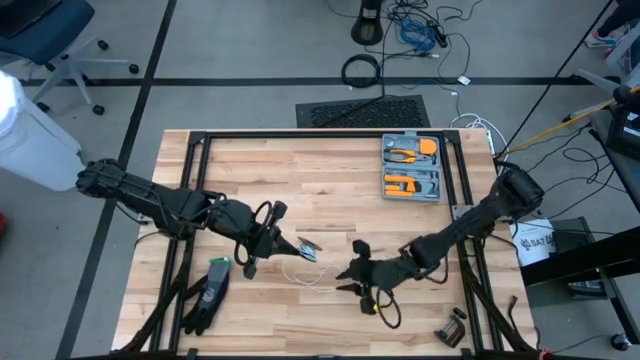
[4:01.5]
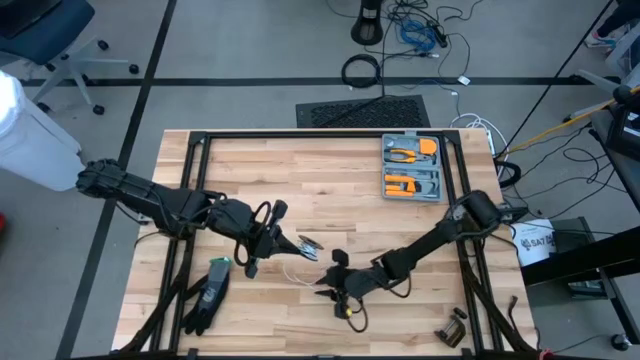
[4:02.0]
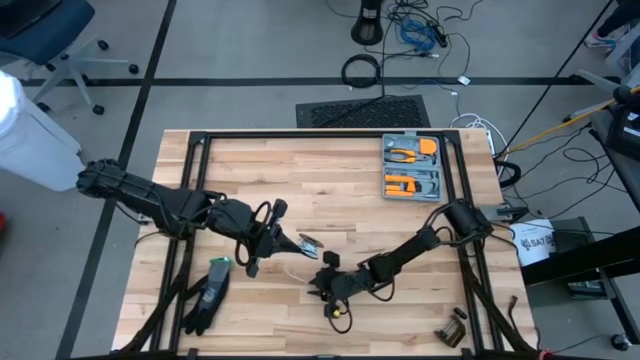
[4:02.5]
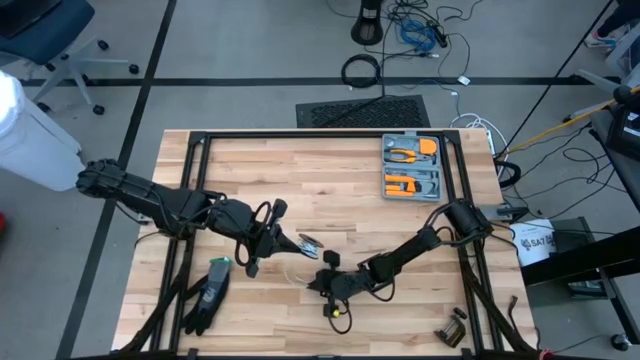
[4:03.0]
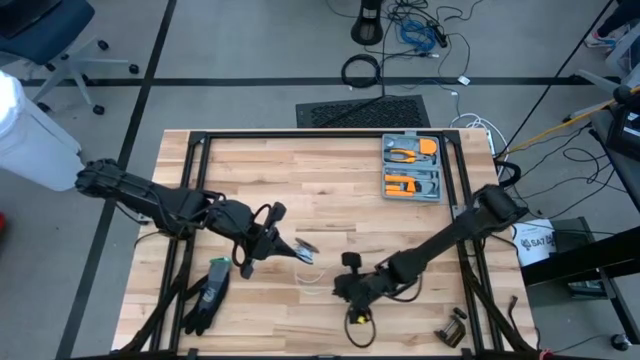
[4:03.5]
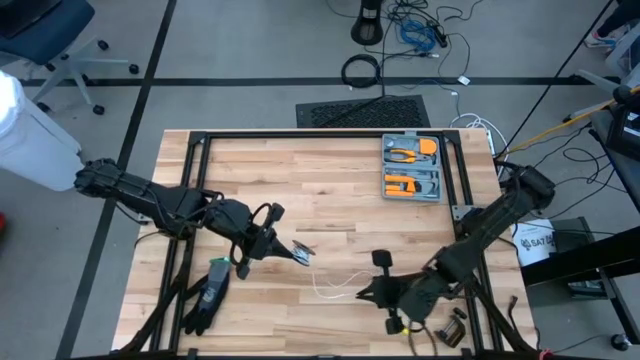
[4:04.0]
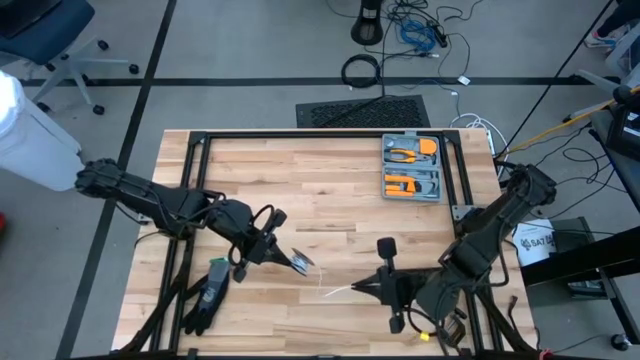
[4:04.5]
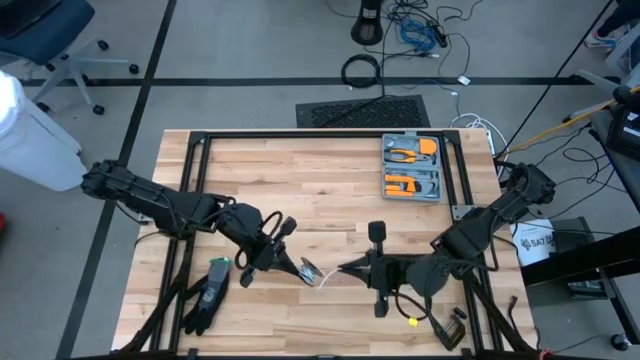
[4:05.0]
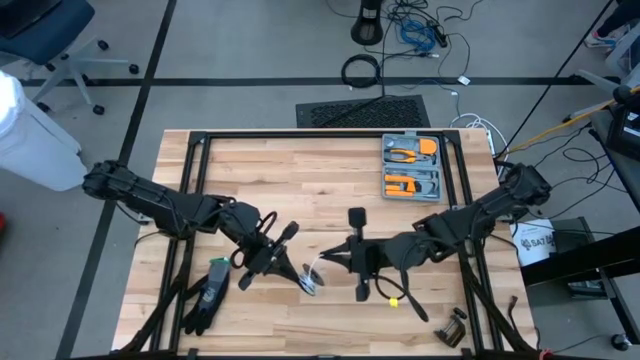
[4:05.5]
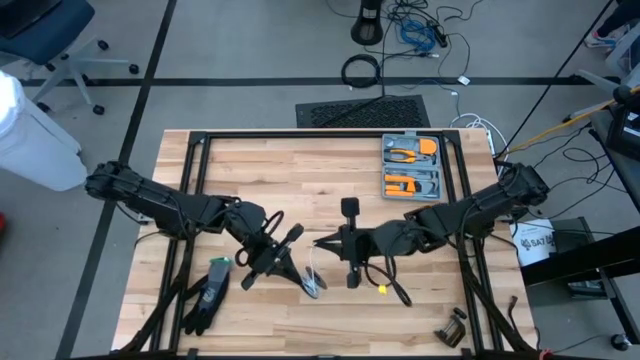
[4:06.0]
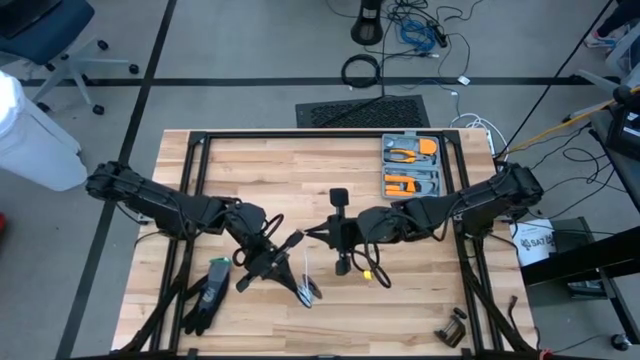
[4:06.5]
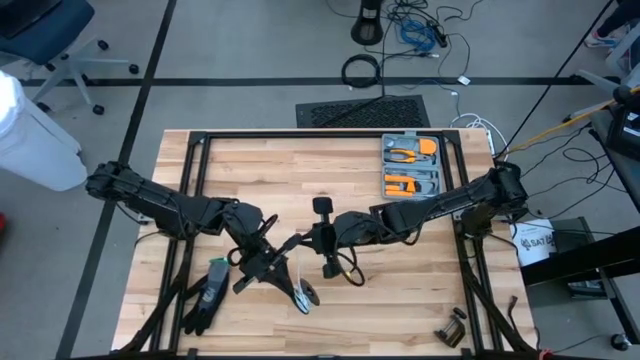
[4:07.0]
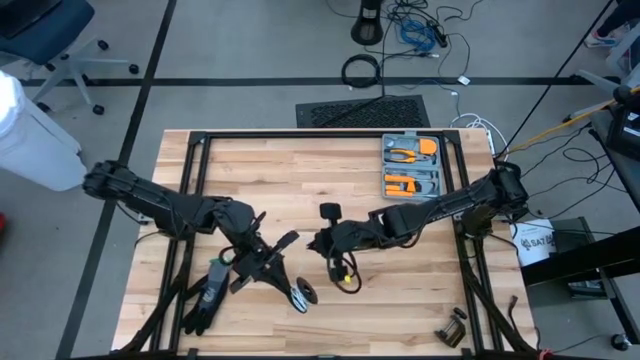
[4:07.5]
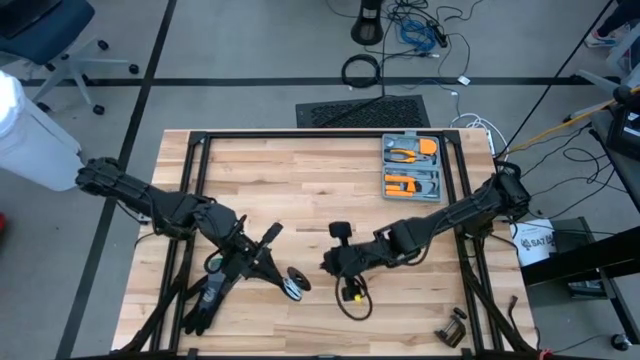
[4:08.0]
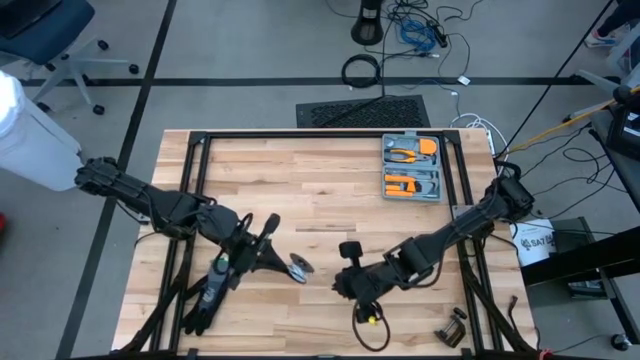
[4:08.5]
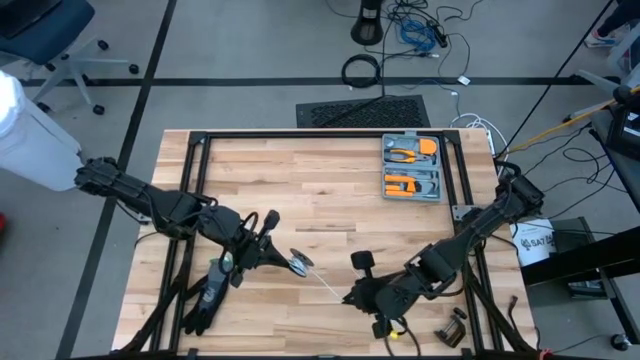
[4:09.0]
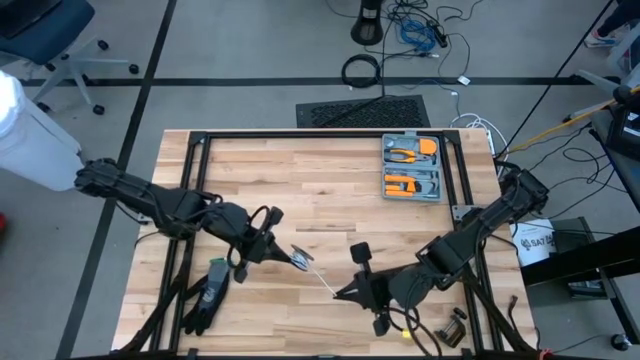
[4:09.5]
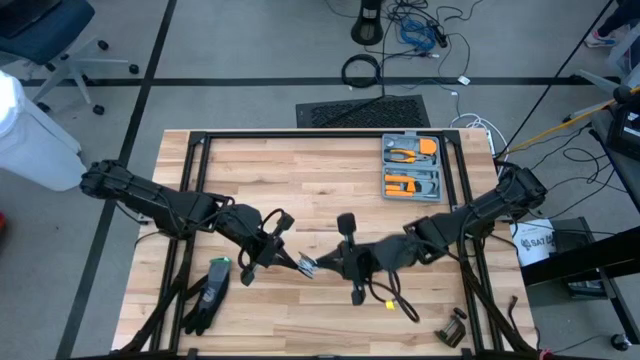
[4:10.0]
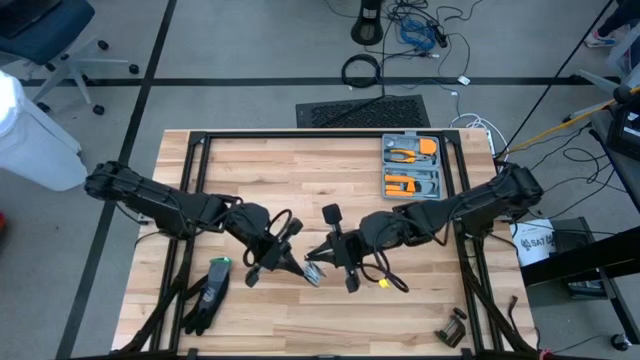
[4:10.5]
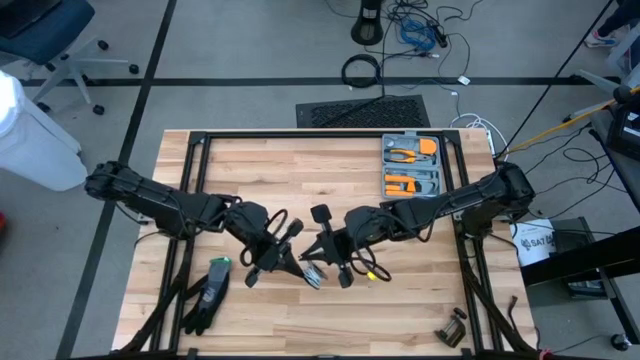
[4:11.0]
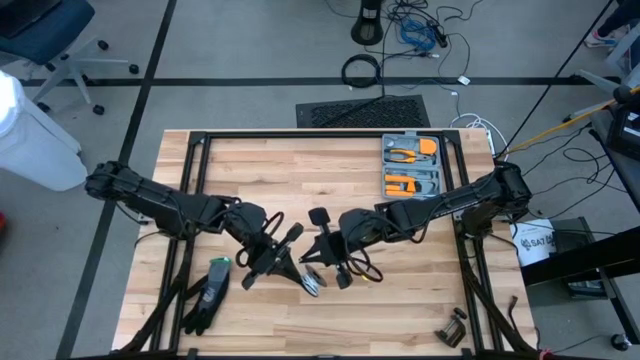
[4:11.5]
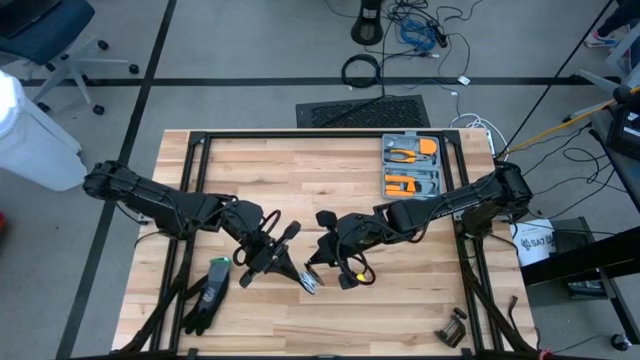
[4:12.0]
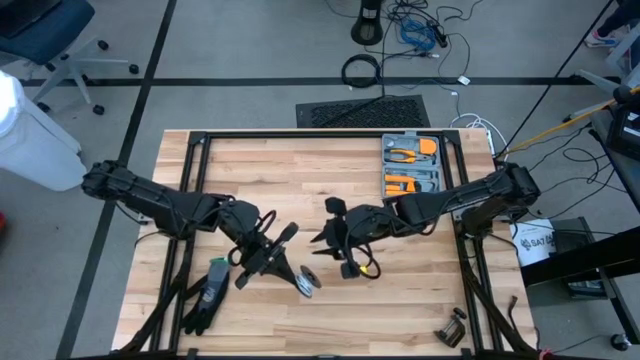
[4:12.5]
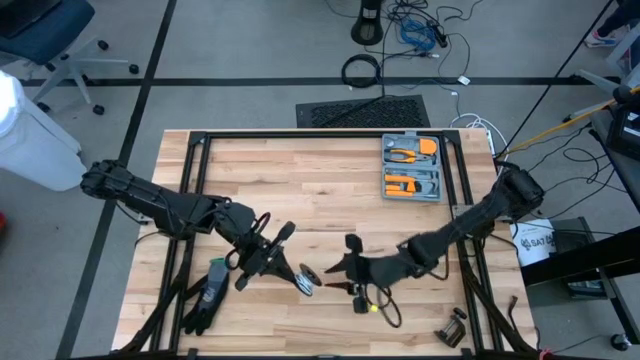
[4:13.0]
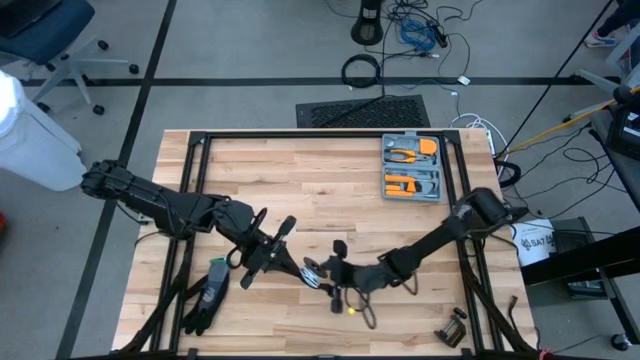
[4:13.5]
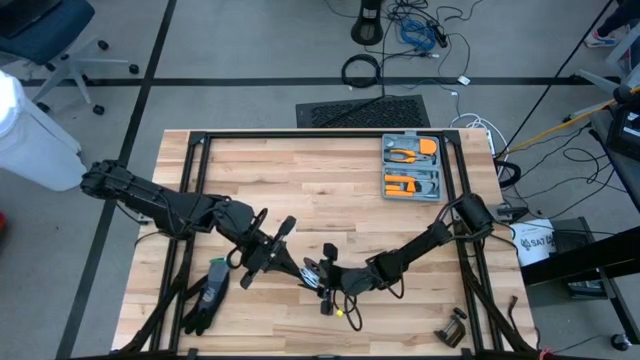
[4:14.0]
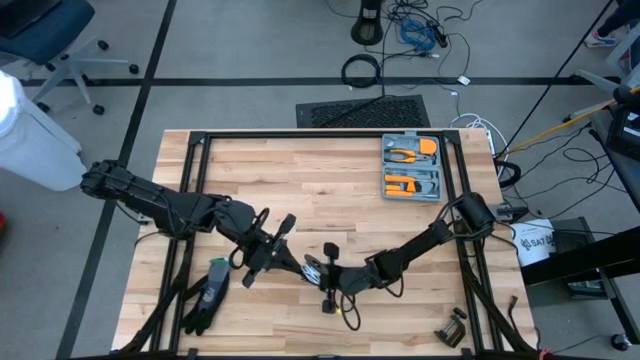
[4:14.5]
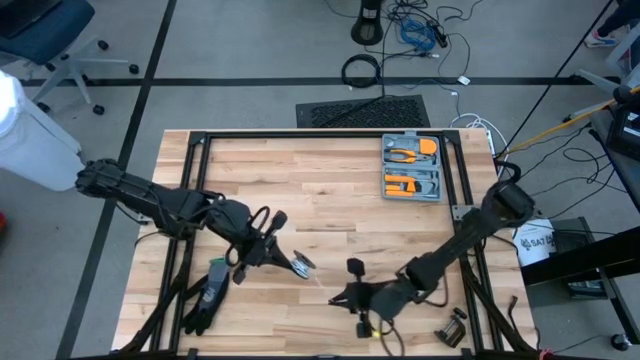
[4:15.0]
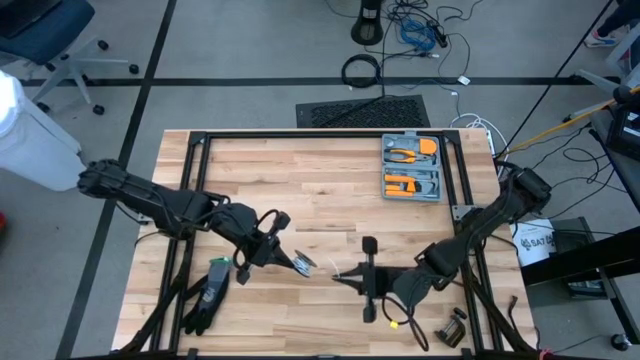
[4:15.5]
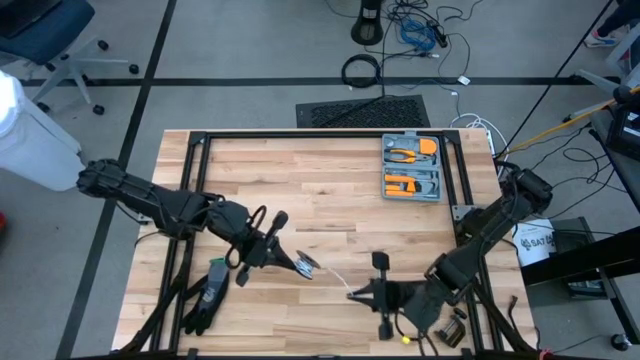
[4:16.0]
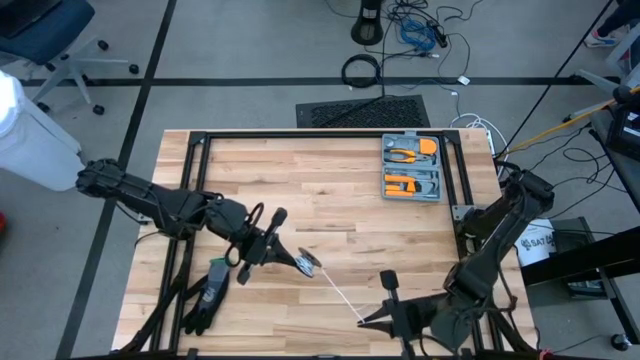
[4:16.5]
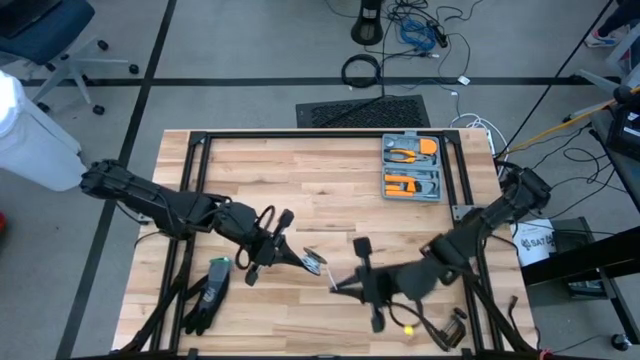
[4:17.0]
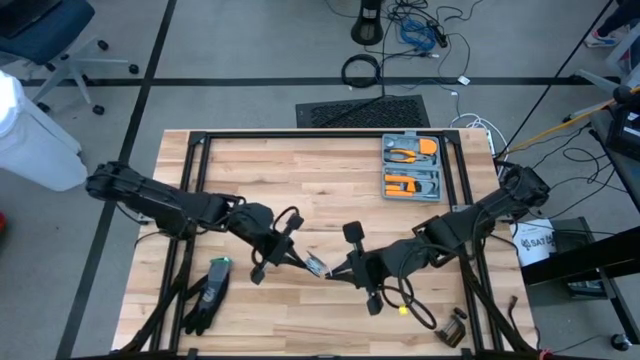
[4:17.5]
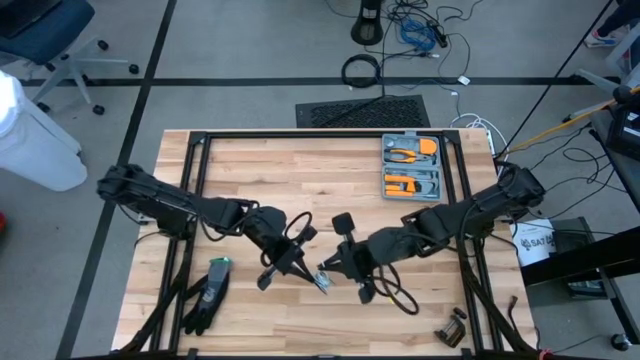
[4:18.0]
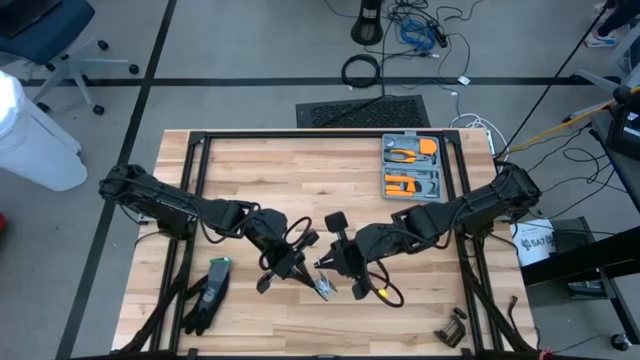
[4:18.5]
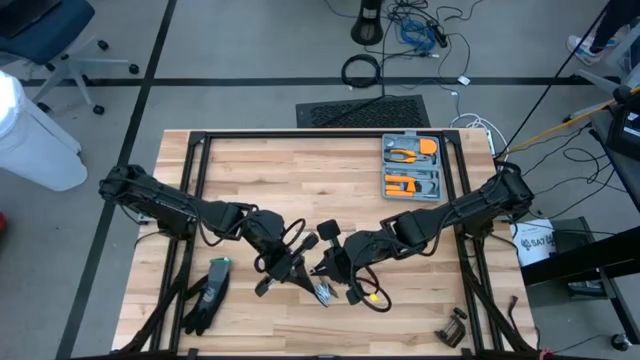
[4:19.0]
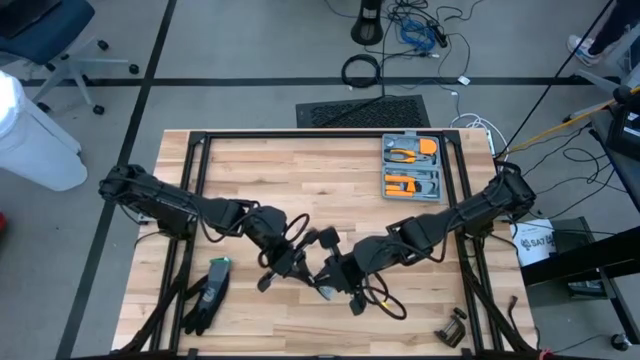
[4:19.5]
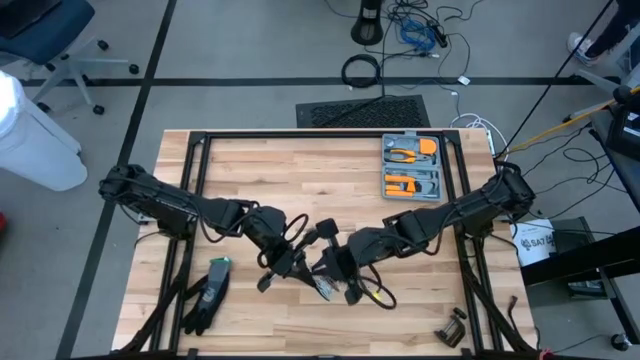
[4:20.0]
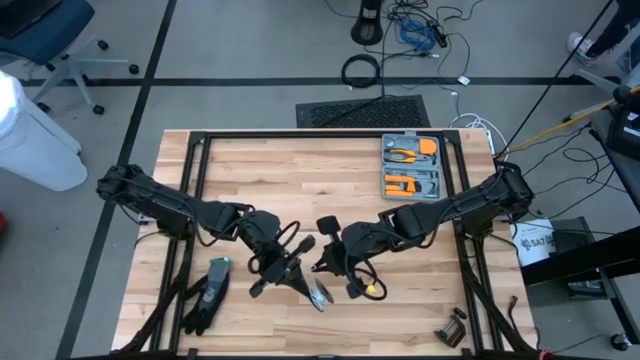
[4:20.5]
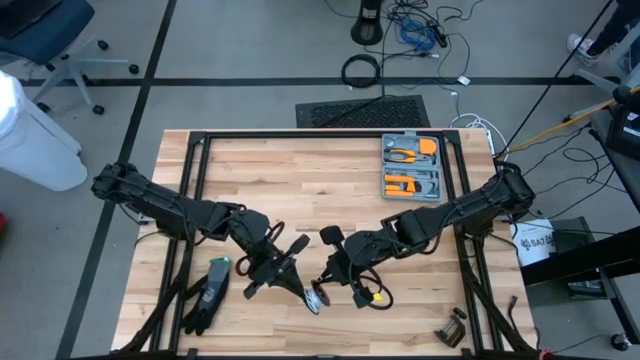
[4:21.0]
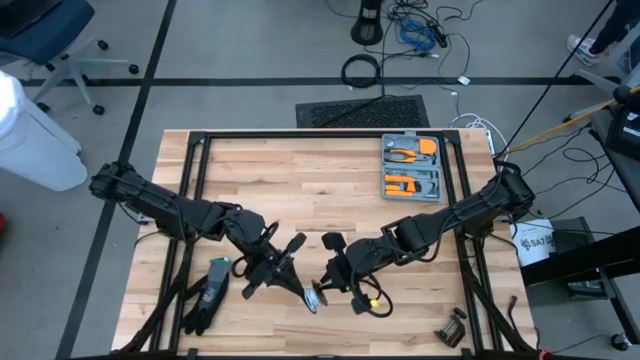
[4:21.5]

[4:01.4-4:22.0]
Task: Coil cords
Coil the white wire onto the spool
